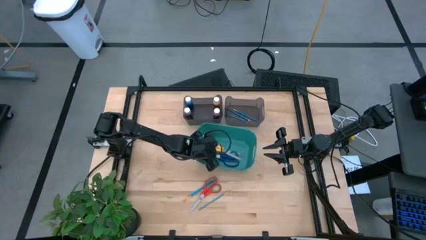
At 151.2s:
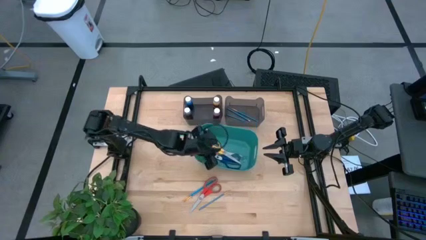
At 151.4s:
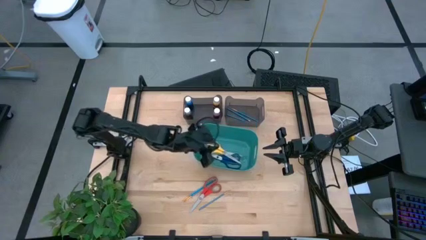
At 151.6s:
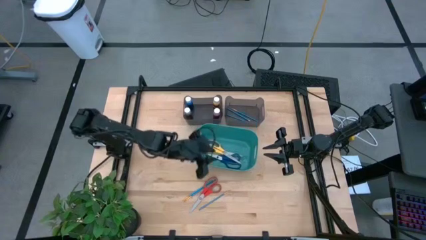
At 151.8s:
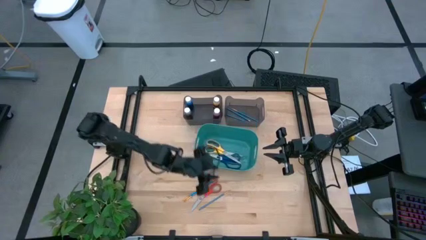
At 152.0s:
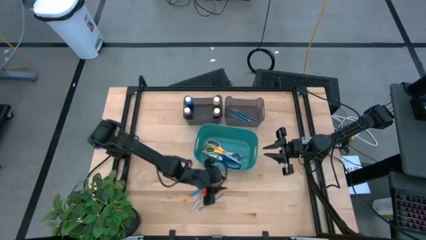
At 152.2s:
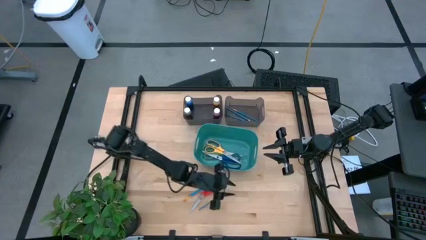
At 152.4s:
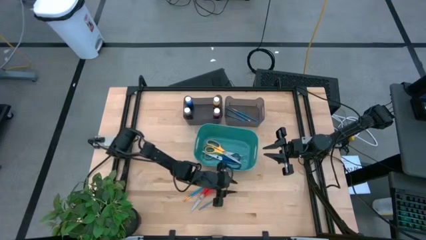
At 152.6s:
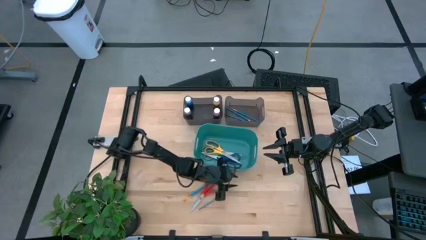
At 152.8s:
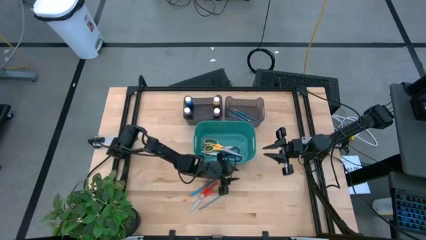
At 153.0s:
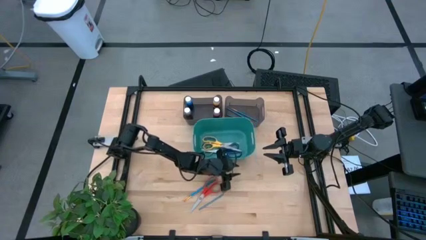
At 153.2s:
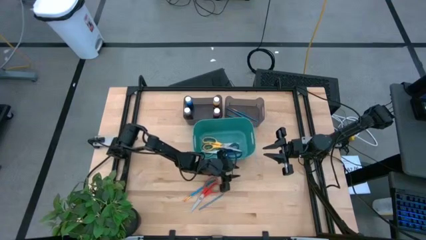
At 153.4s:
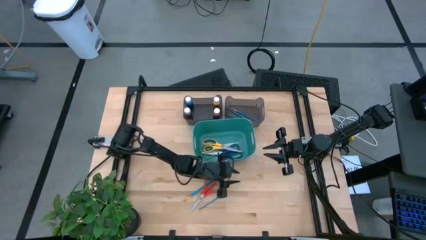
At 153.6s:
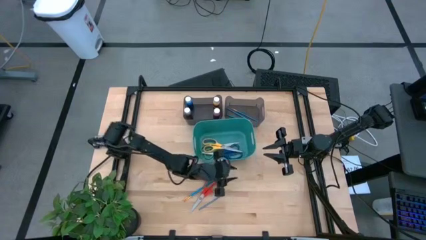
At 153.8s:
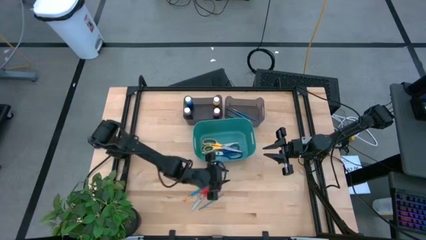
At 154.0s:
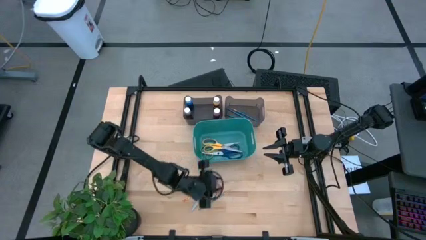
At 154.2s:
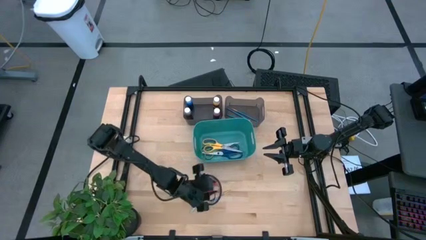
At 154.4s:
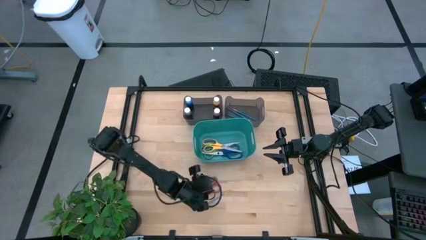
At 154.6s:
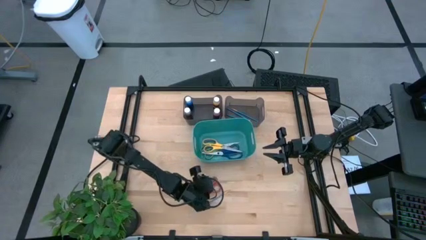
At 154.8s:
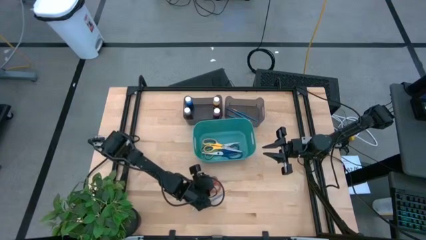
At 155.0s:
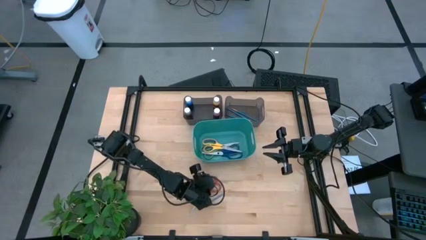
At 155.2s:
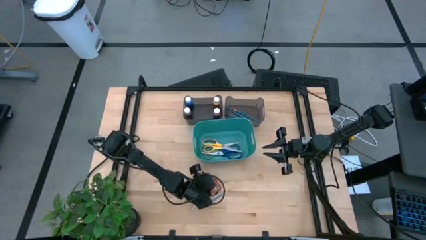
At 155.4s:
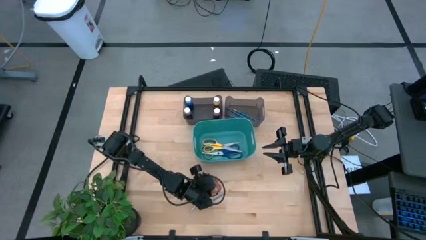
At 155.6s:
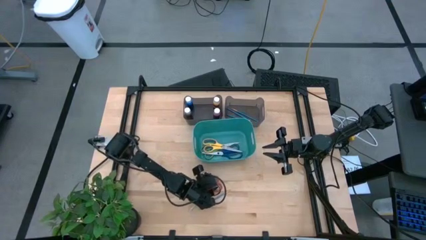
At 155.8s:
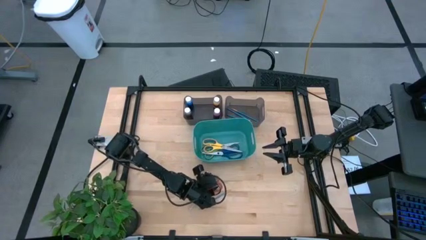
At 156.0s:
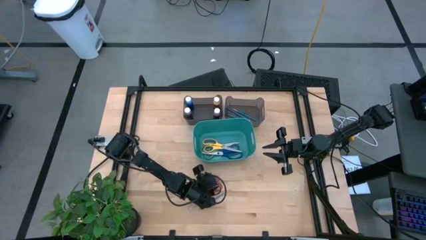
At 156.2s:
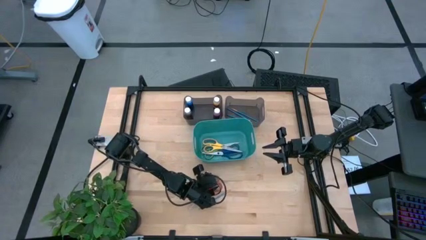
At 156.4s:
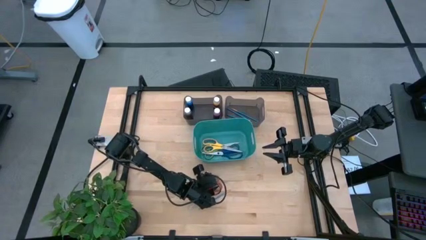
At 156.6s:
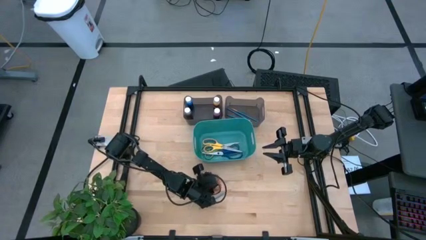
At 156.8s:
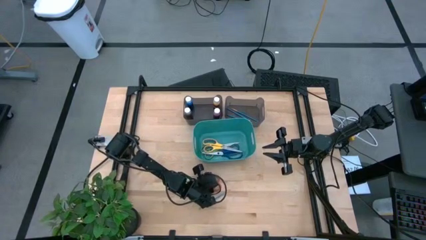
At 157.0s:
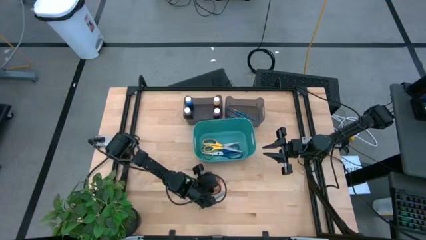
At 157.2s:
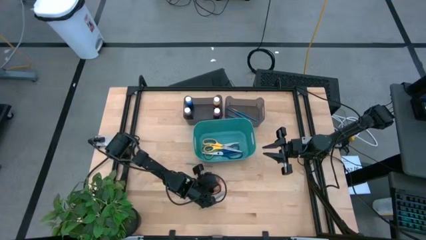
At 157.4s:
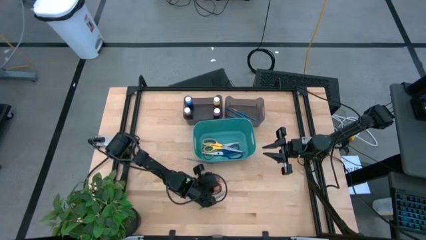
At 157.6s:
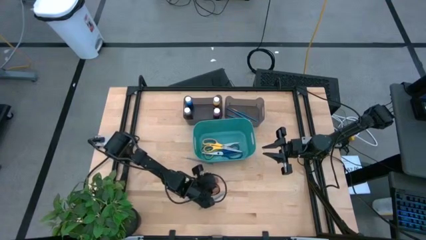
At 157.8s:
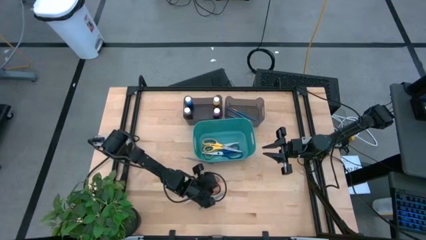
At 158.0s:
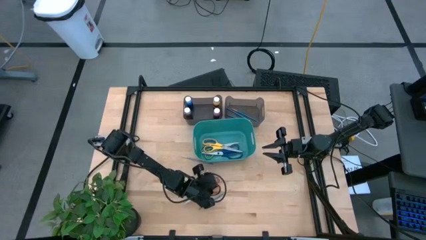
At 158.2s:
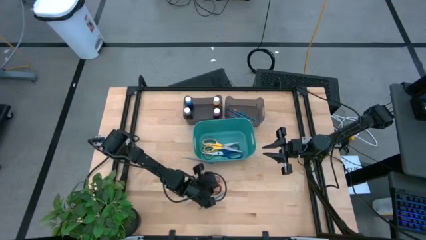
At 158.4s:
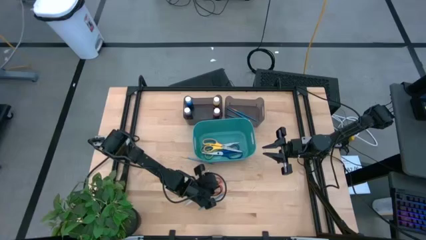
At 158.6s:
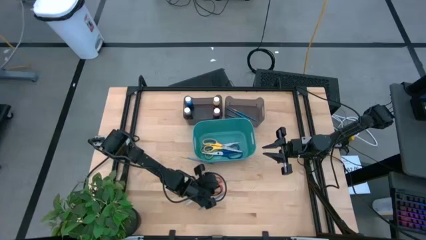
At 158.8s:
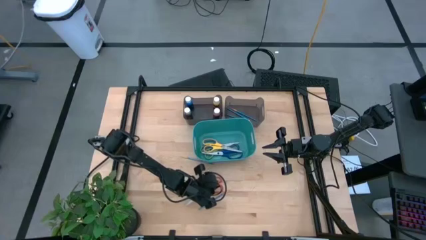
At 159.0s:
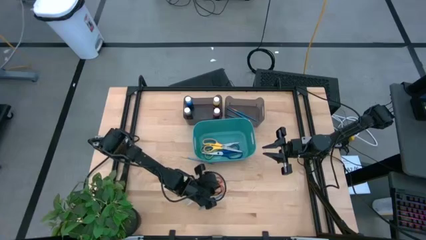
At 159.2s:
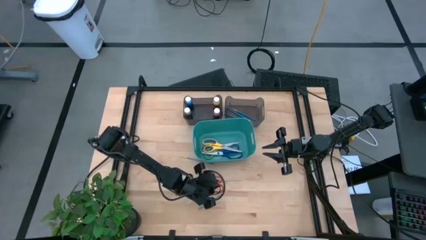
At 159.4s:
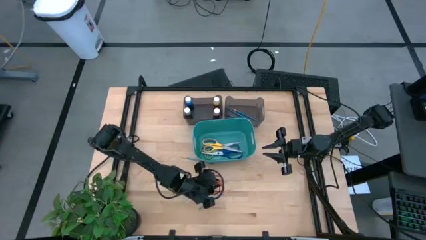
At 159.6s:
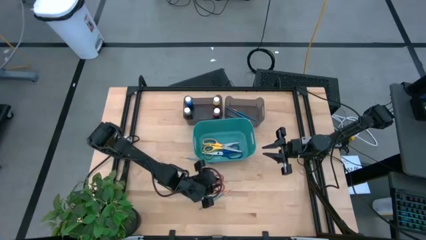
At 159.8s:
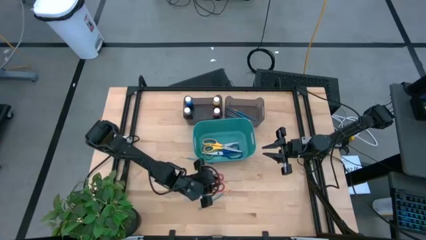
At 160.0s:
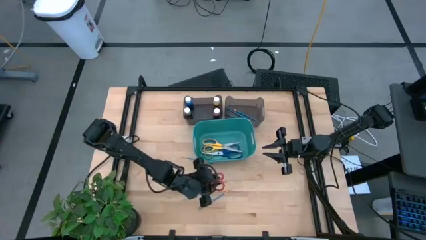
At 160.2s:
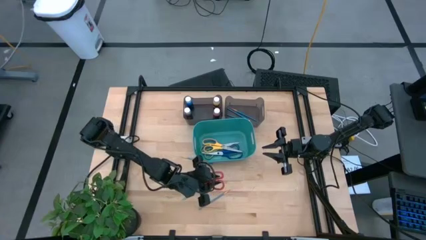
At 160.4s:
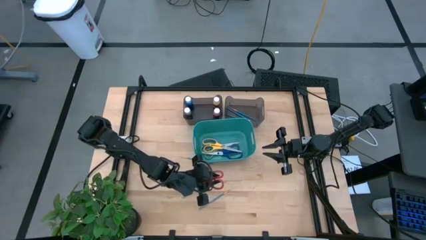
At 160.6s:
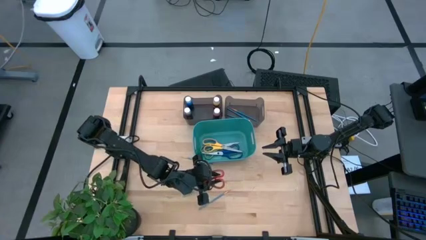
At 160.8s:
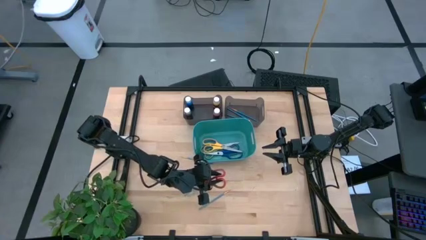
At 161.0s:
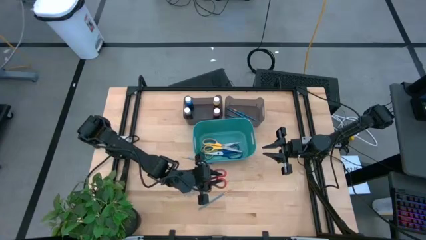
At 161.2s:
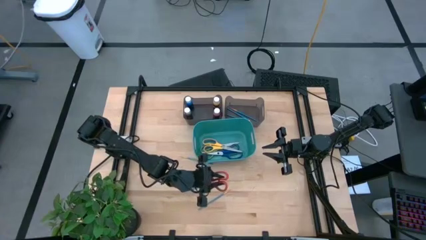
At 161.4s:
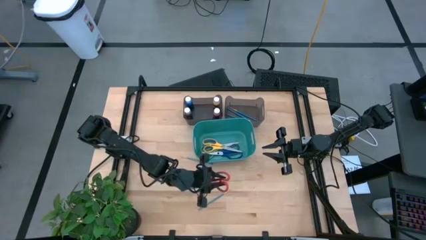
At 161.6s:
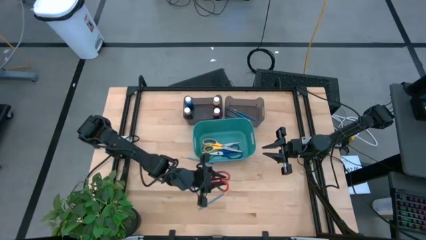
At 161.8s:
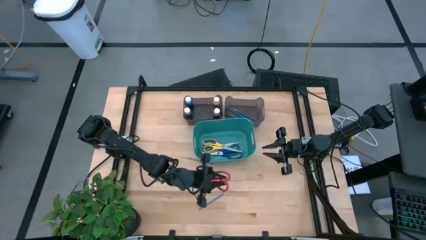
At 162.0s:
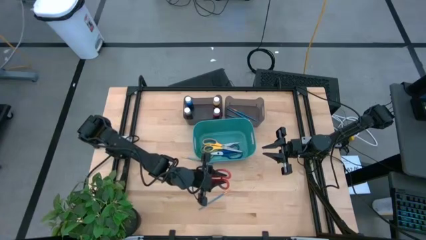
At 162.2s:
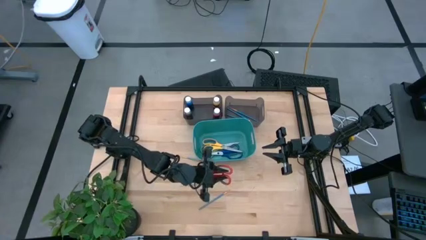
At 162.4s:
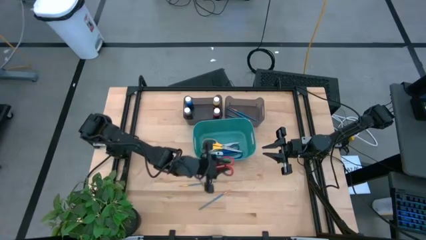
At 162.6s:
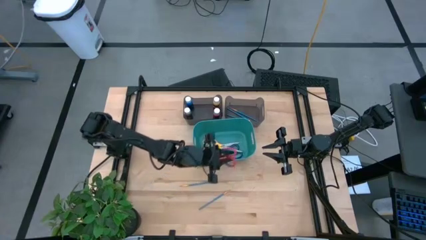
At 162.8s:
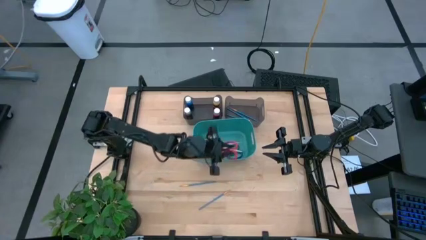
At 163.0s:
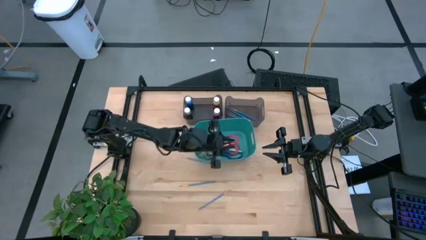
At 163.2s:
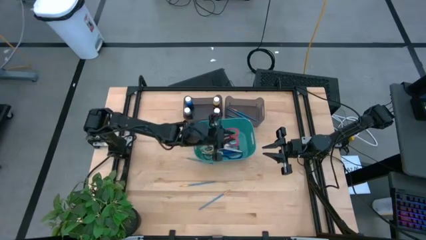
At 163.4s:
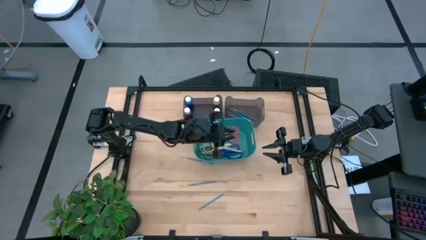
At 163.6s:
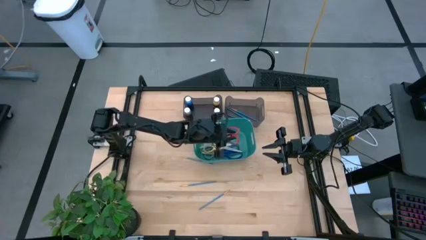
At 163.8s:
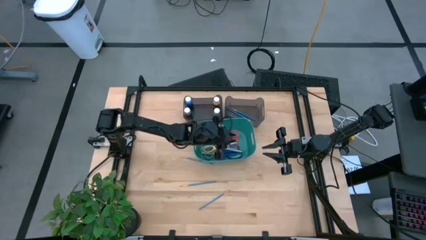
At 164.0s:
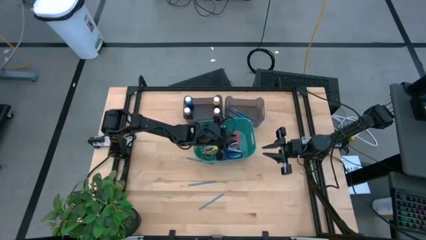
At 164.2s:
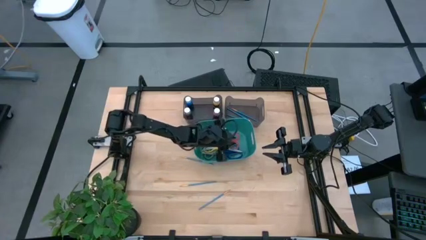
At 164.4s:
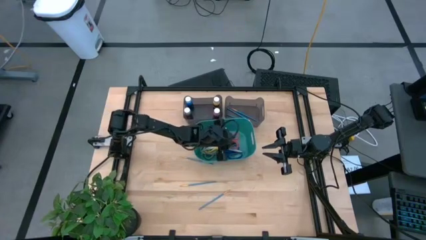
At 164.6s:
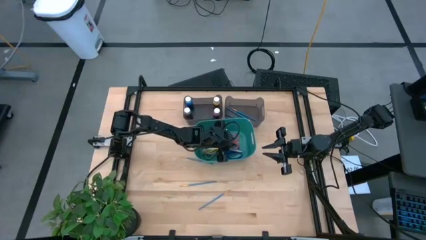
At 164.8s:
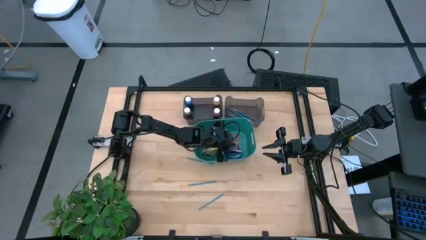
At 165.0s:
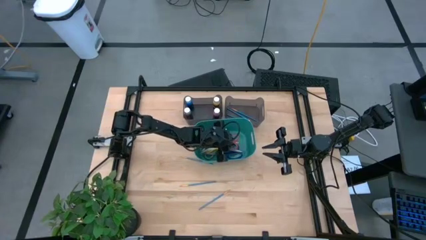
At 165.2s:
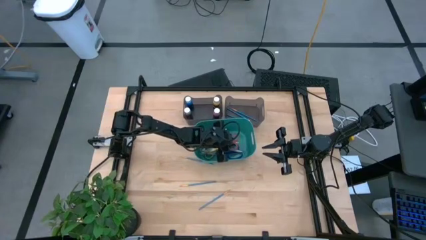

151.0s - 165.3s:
Task: Pick & Place Paint Supplies
Put the orange scissors into the green bin

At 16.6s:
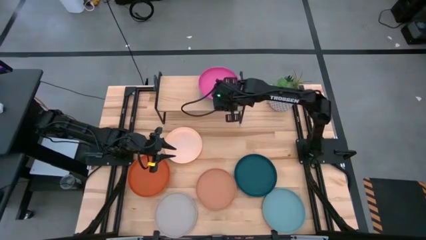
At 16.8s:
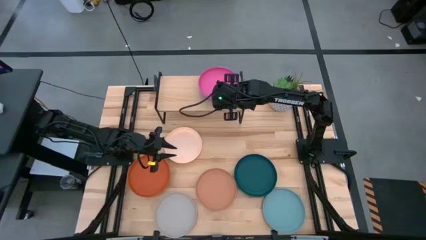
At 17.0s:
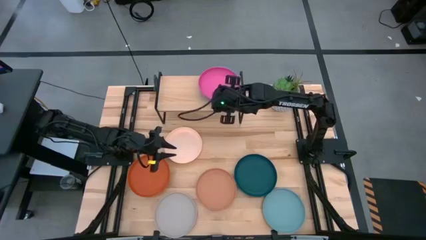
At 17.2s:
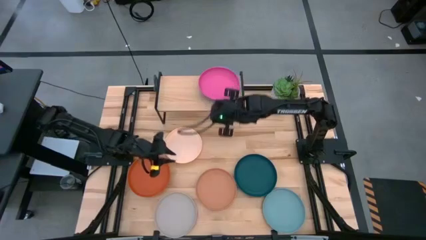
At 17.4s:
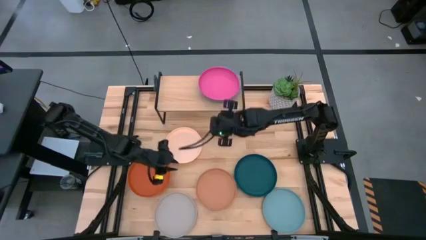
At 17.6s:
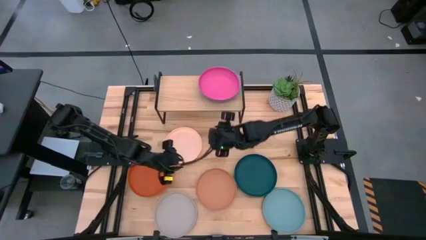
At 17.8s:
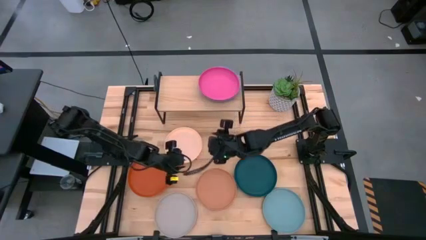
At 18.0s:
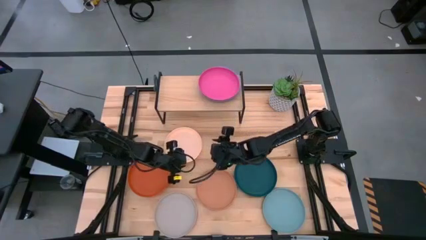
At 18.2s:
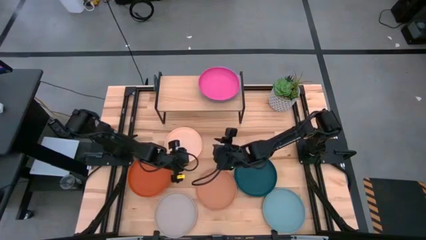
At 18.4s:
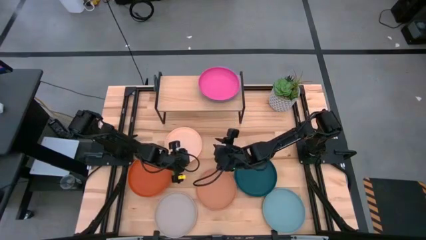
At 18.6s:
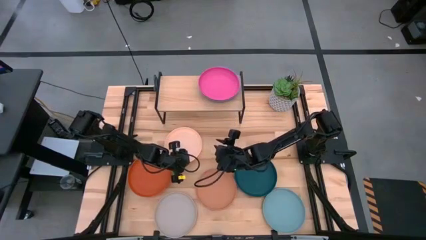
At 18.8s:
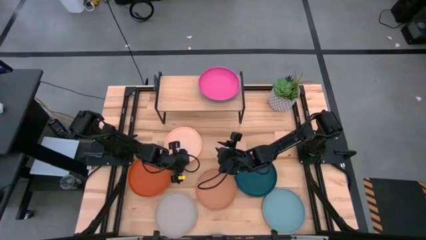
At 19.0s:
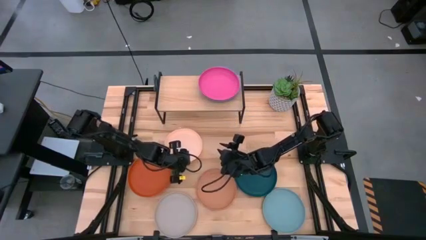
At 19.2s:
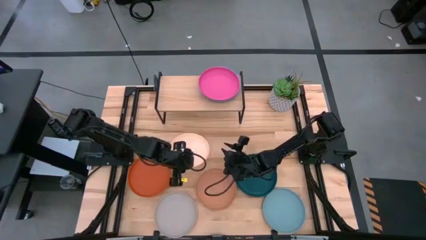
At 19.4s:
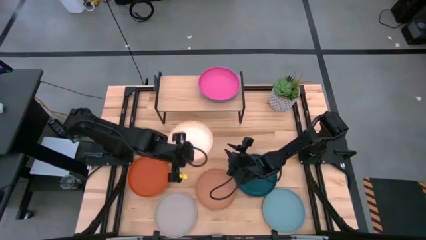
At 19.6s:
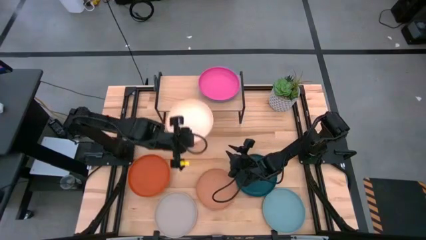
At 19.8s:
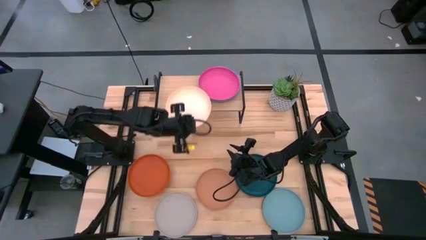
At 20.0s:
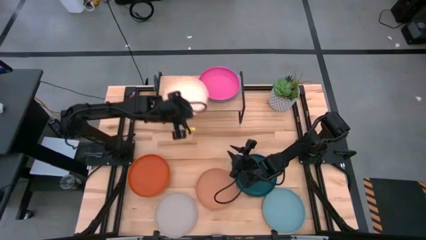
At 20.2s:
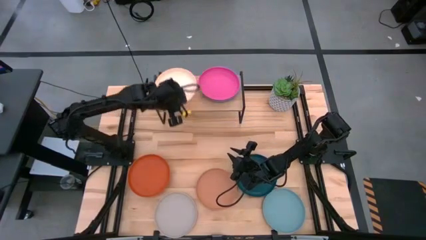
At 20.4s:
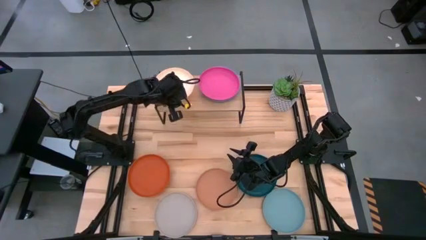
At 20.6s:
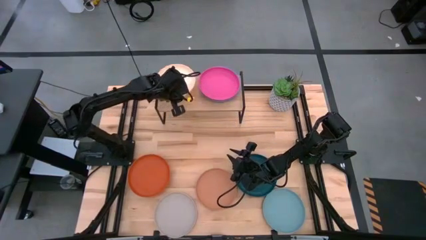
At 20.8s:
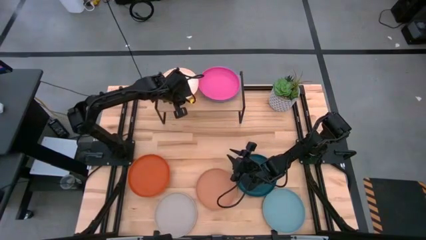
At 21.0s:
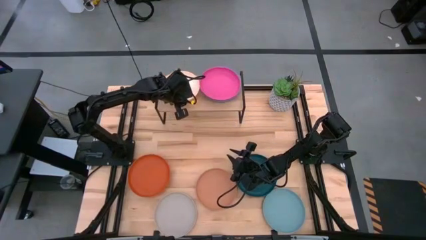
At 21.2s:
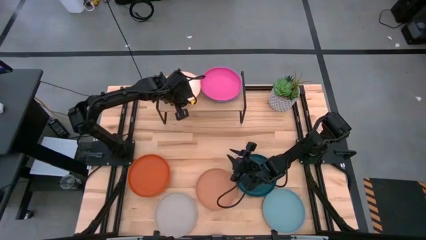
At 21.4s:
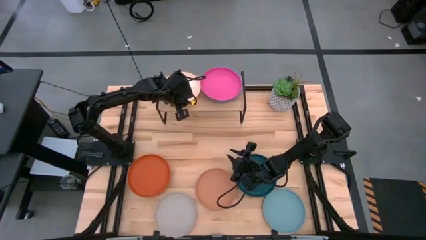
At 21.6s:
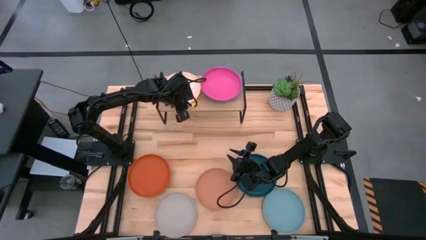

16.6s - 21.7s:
Task: Place and stack plates onto a shelf
Put the white plate on the shelf
